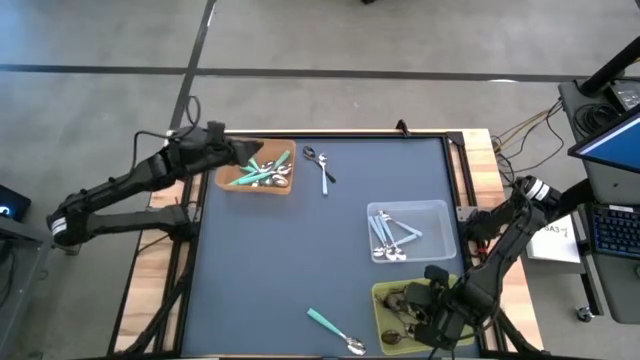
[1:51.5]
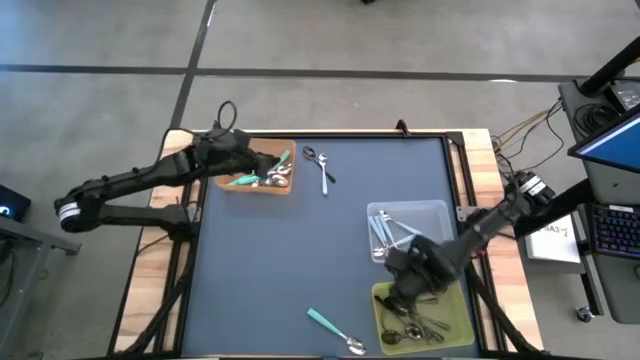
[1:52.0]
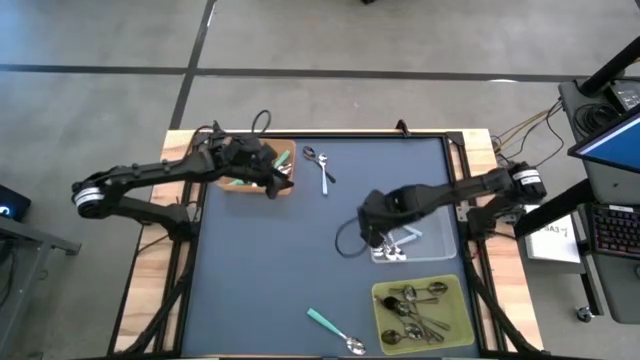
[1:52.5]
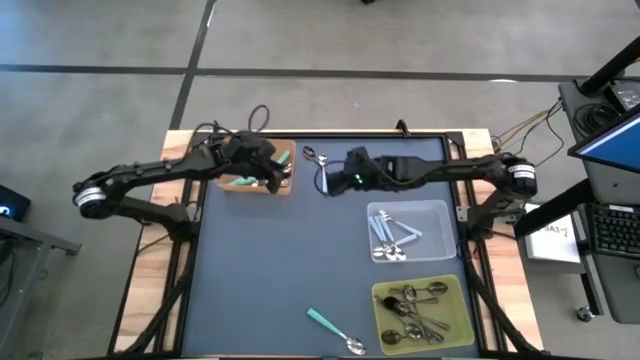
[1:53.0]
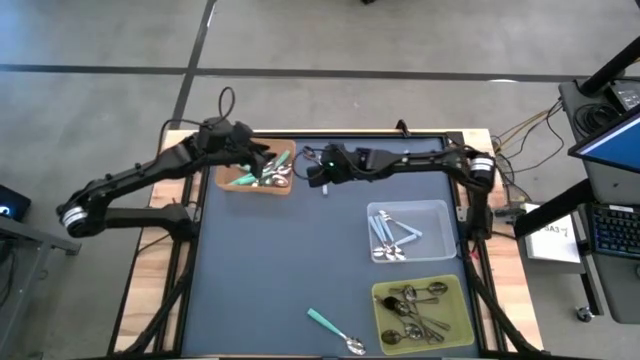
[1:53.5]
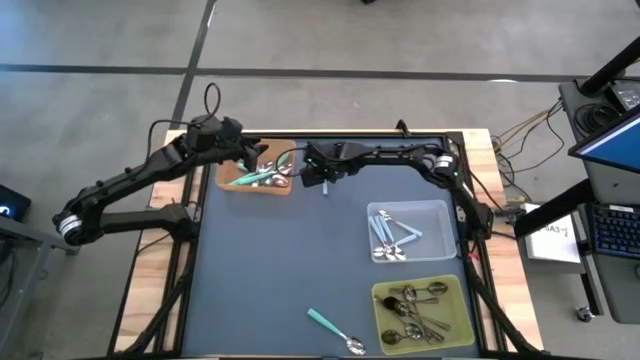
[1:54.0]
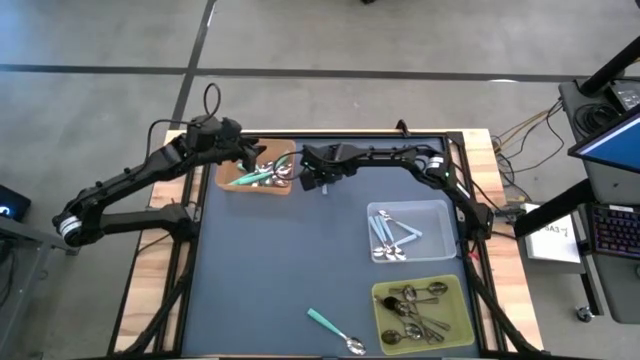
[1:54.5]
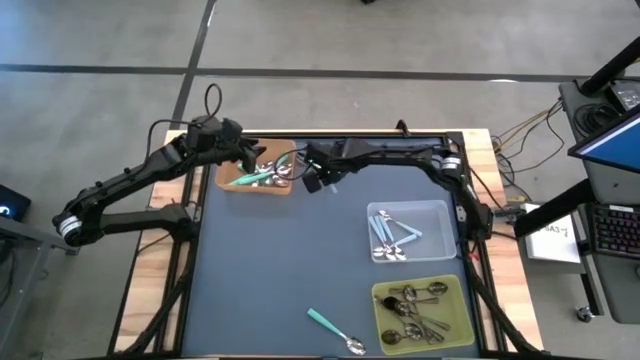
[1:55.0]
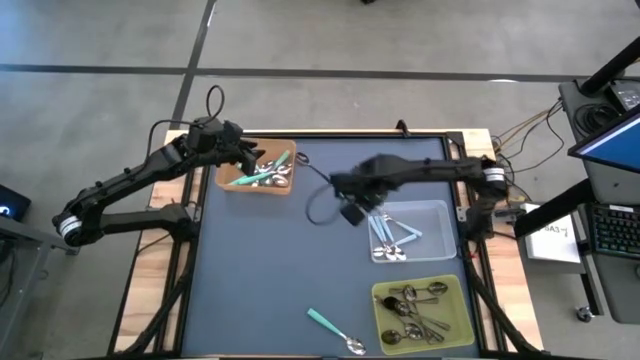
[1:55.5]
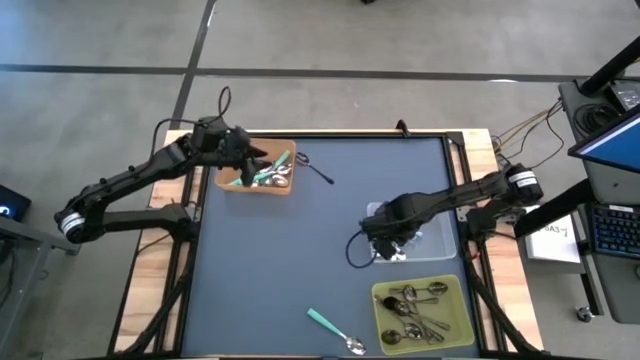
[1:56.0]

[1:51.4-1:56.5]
Task: Sort silverware by color (type)
Put the white spoon into the transparent bin

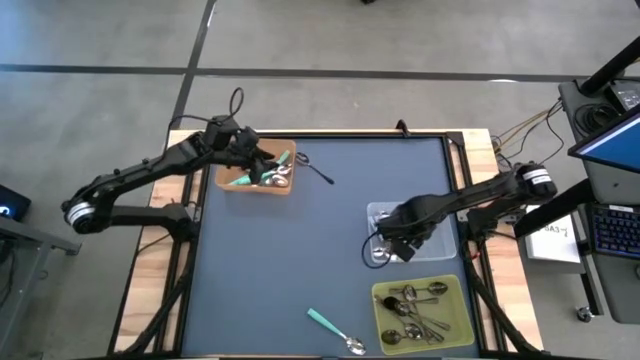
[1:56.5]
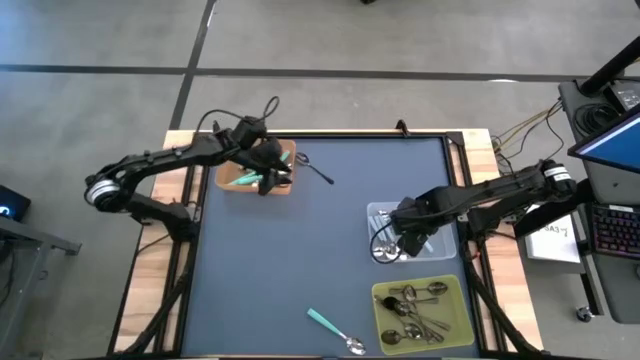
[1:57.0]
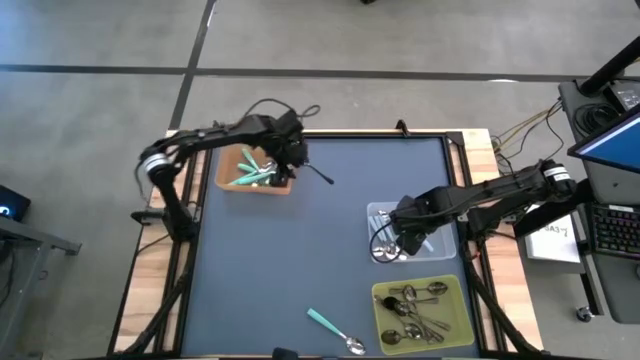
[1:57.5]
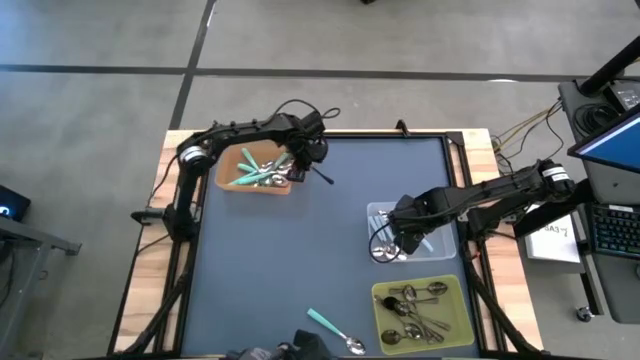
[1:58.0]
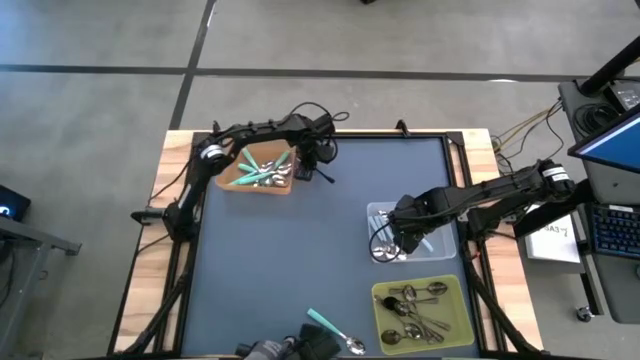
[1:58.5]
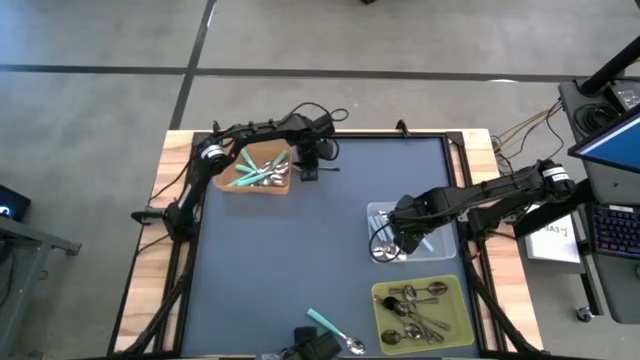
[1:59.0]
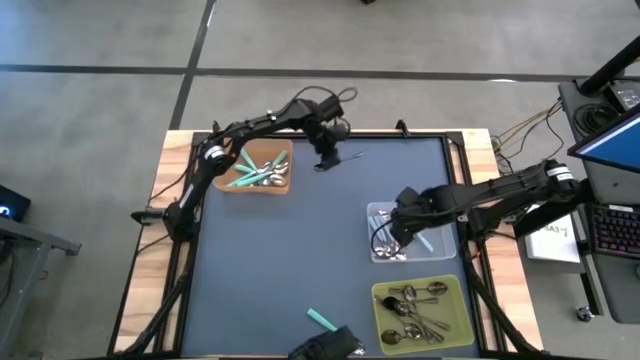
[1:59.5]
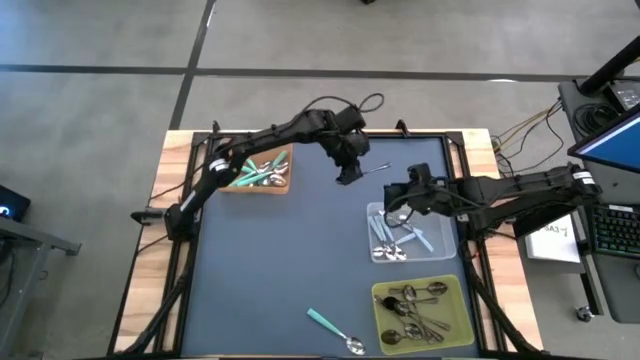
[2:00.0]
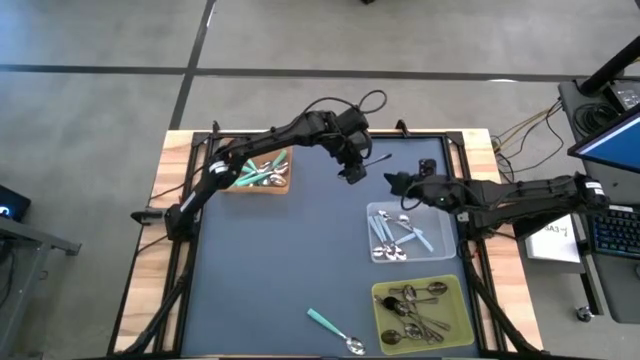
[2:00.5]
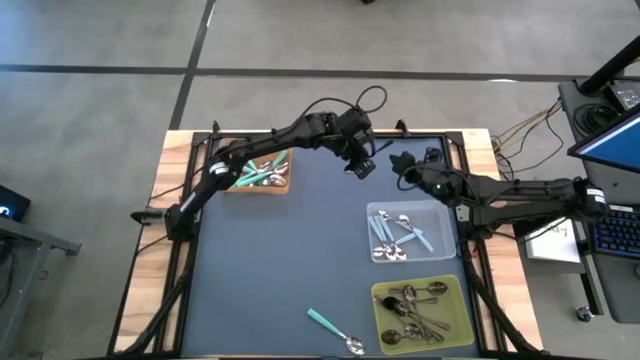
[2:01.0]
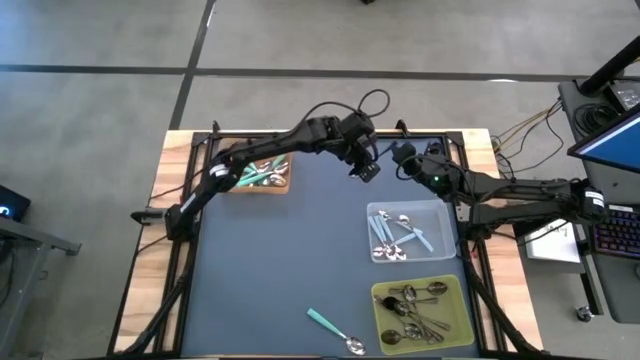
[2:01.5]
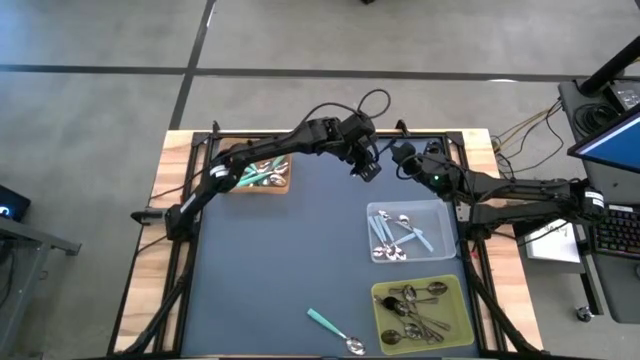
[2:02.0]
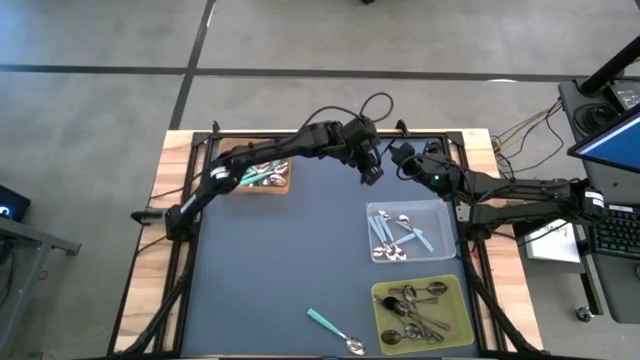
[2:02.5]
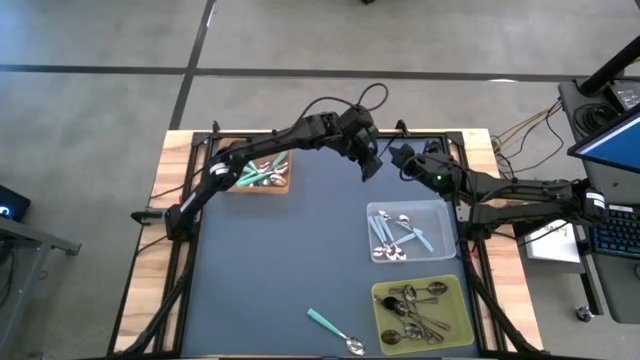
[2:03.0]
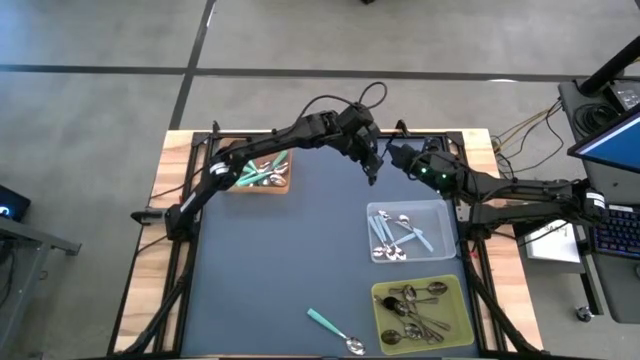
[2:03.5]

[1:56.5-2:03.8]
Put the black spoon into the yellow bin

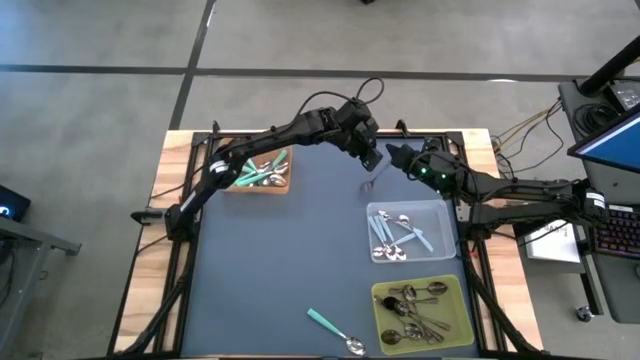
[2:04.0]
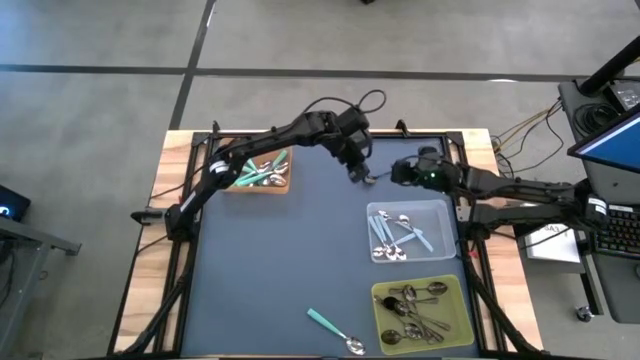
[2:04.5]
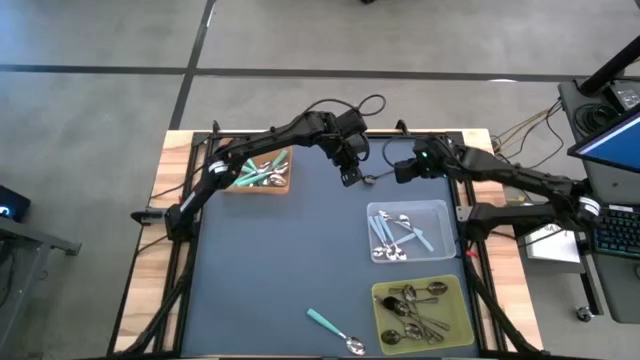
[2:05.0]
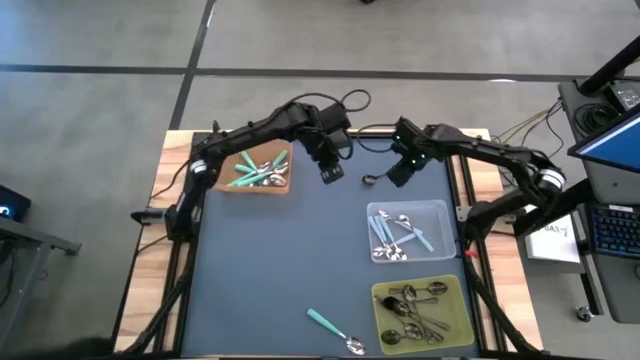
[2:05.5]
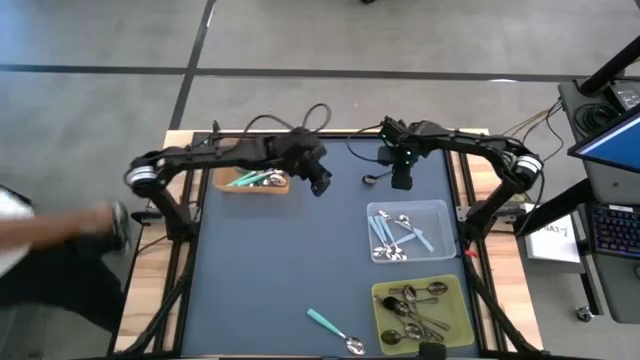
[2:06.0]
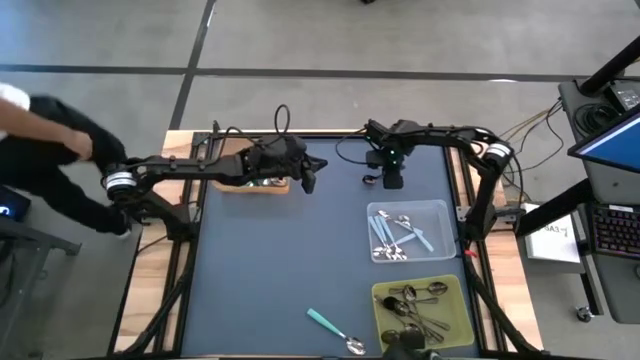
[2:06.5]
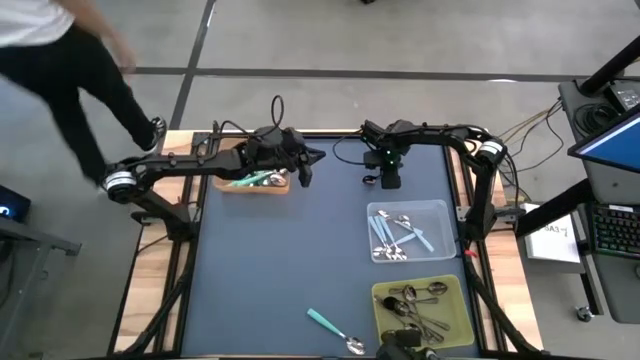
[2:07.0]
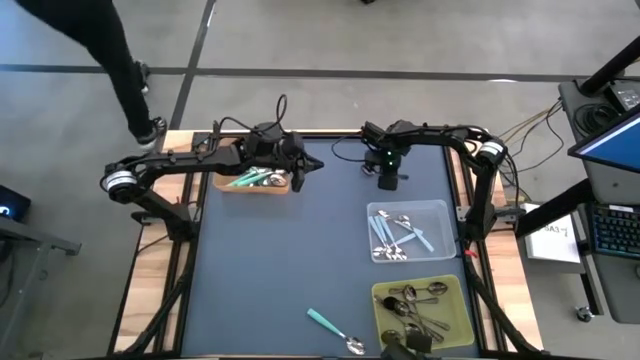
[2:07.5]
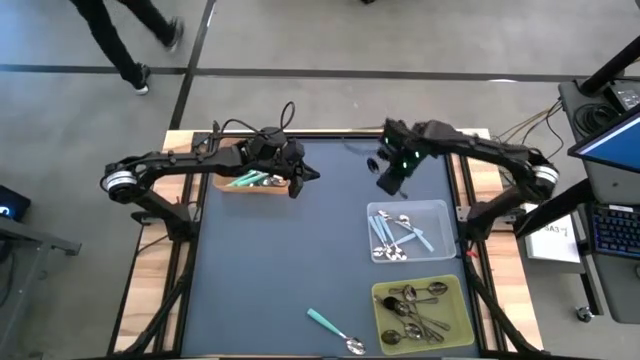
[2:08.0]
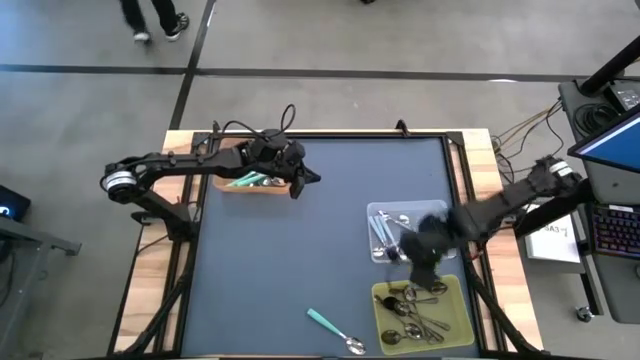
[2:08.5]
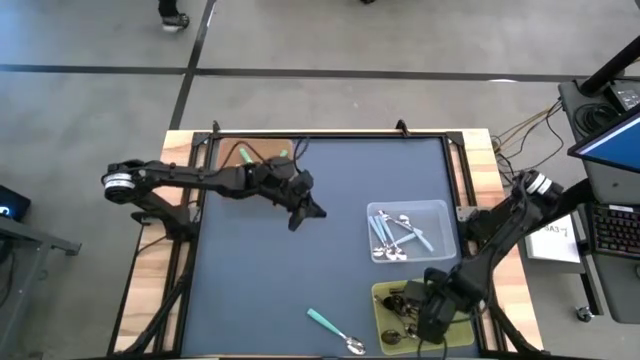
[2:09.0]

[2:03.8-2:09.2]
Put the black spoon into the yellow bin

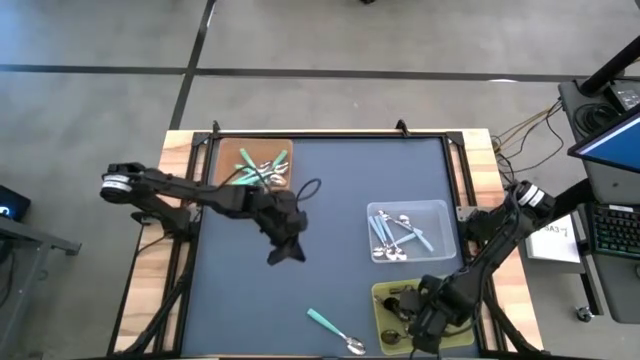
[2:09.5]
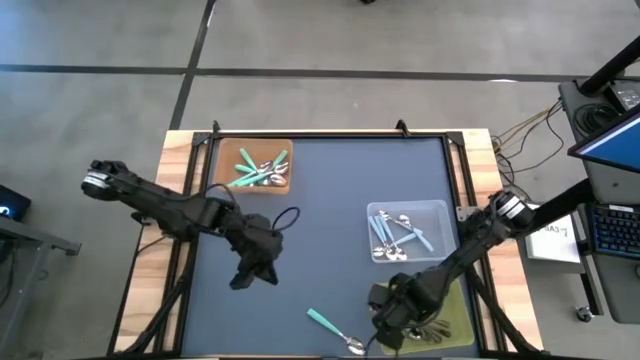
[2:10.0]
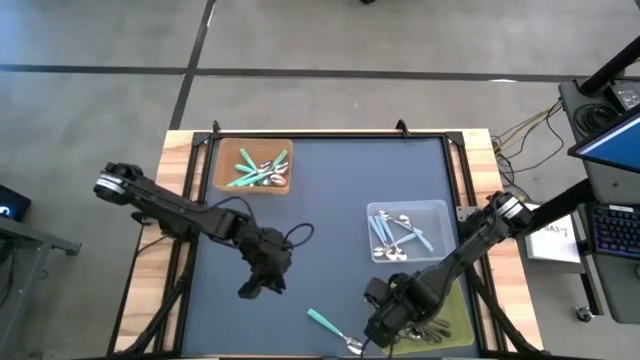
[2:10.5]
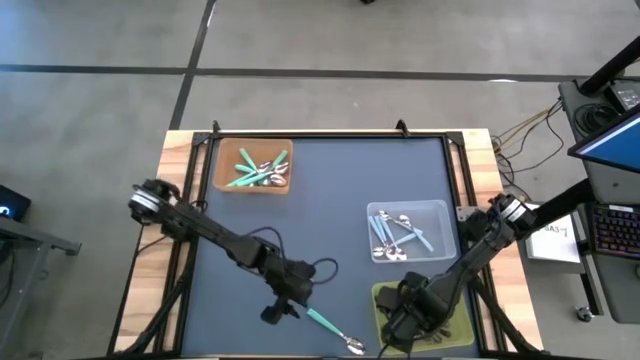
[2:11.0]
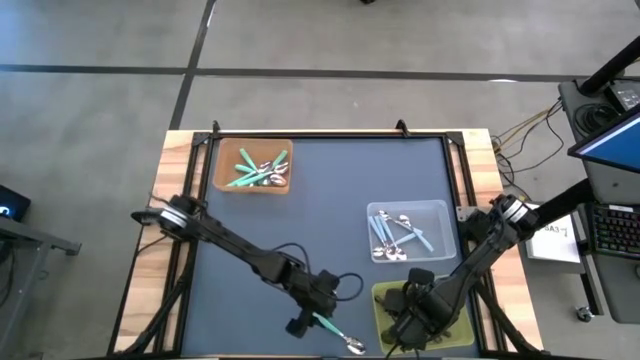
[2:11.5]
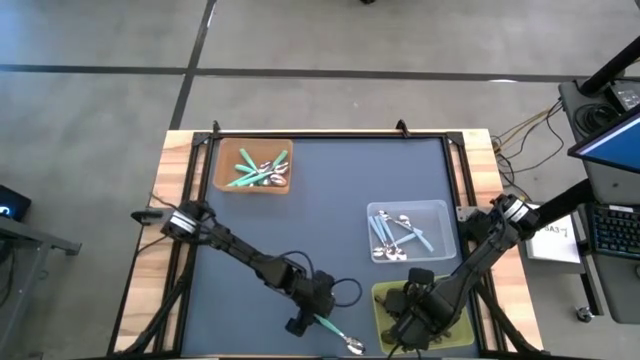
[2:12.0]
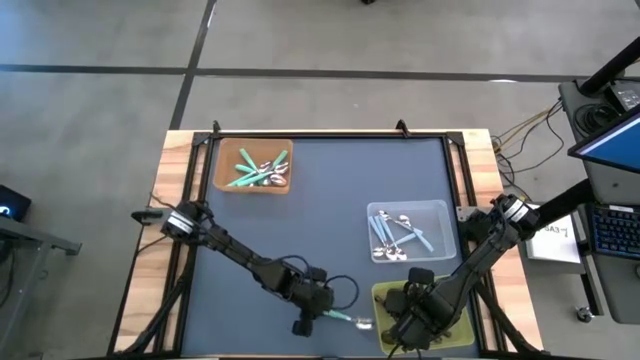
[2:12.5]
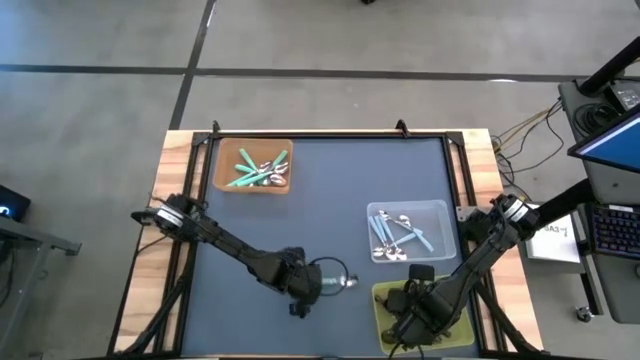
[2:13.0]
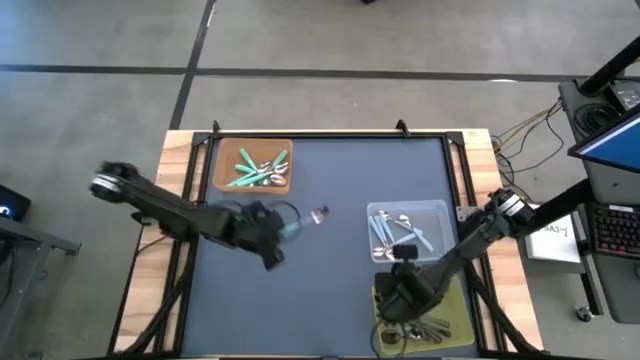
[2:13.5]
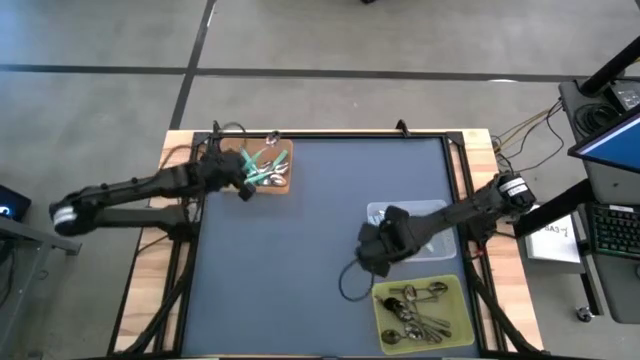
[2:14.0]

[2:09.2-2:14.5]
Put the green spoon into the orange bin
